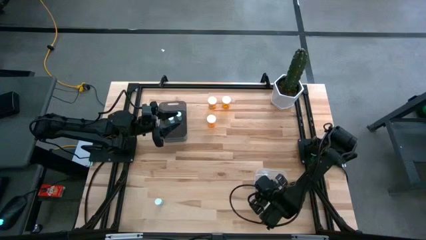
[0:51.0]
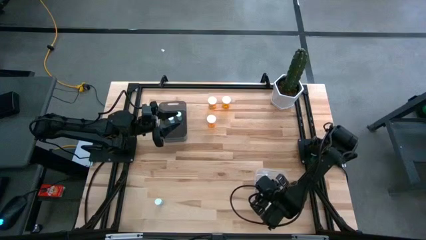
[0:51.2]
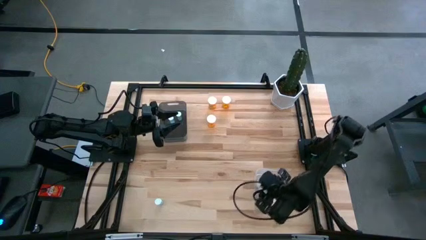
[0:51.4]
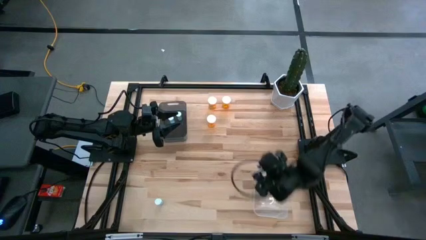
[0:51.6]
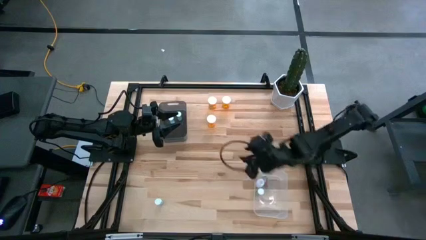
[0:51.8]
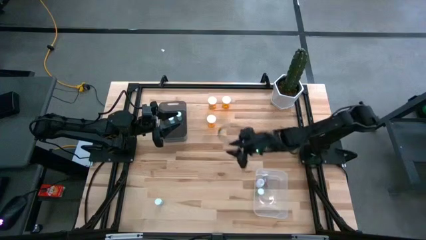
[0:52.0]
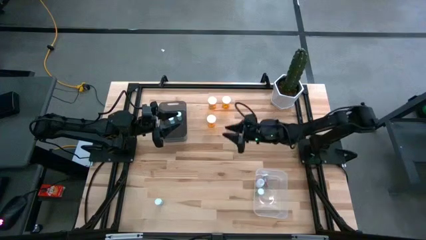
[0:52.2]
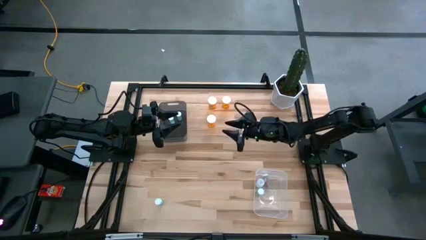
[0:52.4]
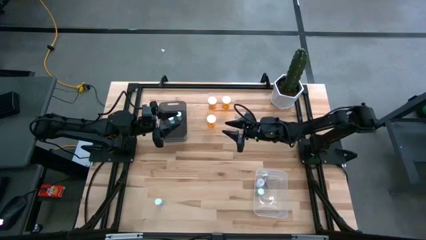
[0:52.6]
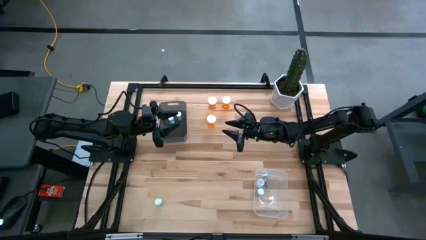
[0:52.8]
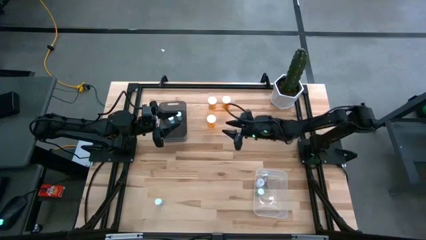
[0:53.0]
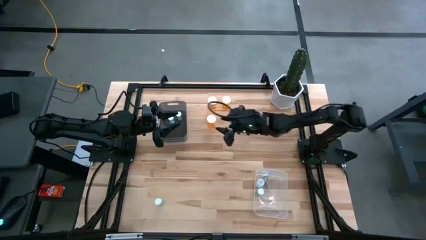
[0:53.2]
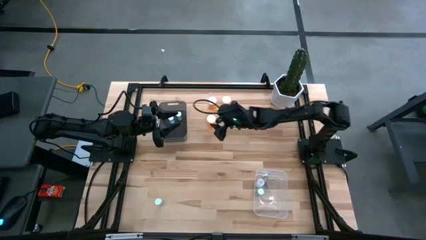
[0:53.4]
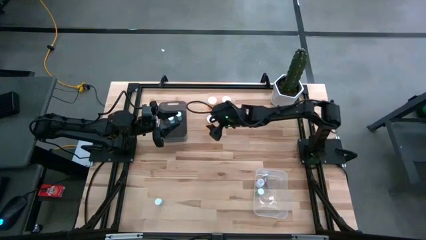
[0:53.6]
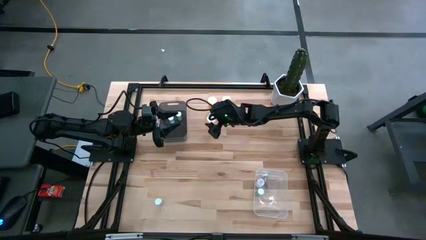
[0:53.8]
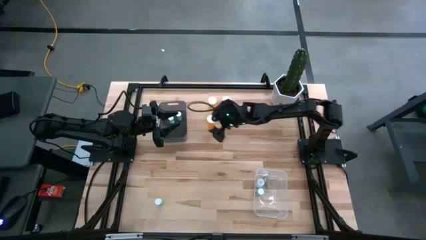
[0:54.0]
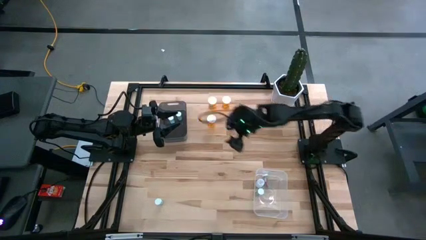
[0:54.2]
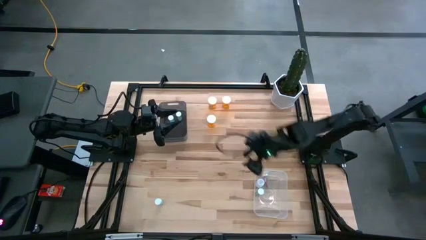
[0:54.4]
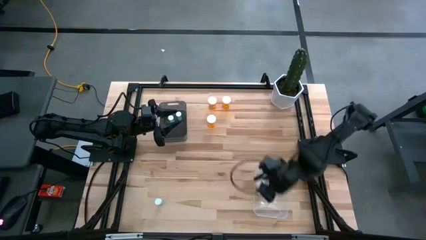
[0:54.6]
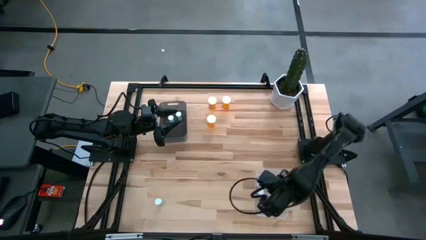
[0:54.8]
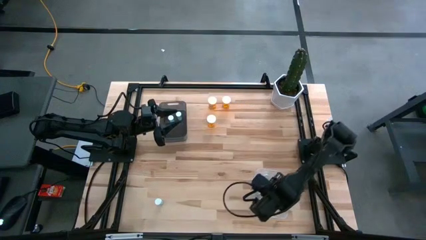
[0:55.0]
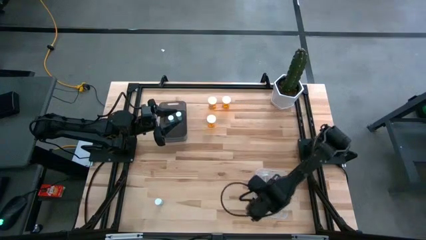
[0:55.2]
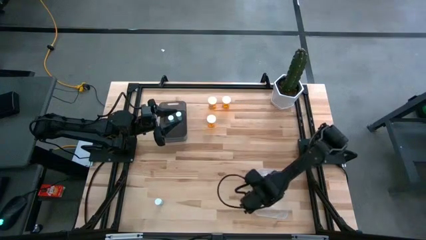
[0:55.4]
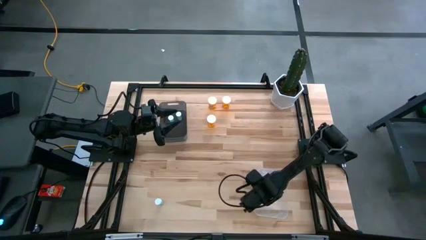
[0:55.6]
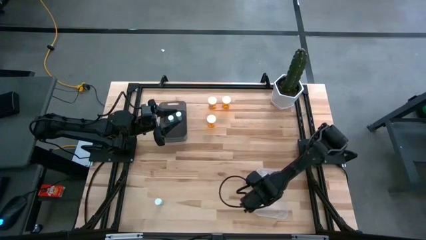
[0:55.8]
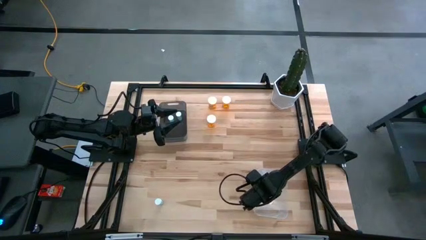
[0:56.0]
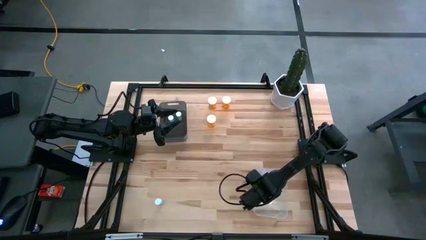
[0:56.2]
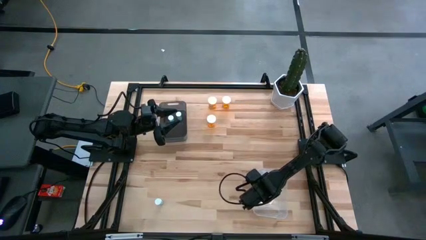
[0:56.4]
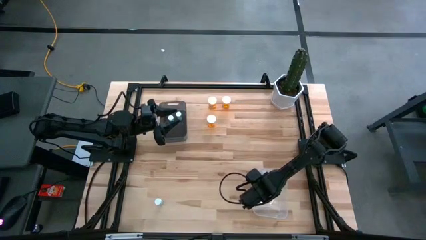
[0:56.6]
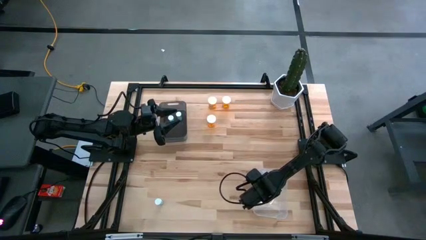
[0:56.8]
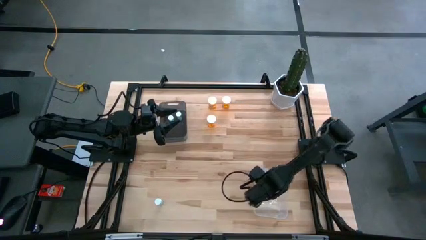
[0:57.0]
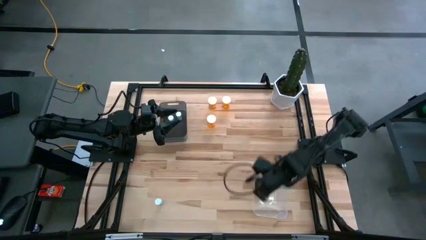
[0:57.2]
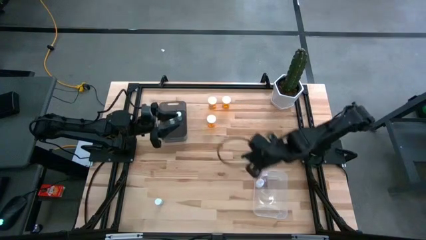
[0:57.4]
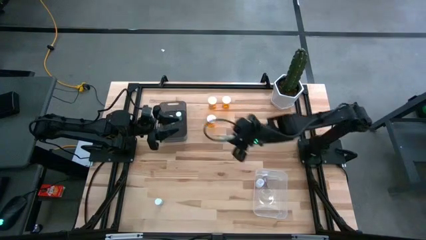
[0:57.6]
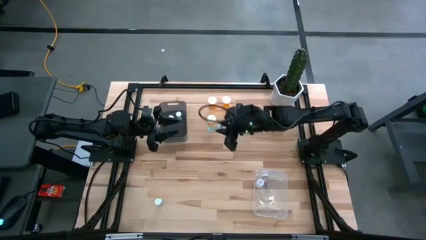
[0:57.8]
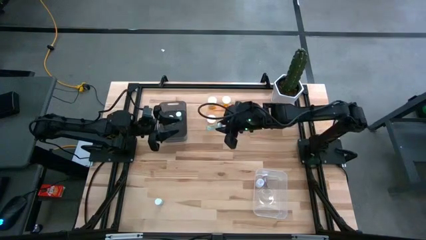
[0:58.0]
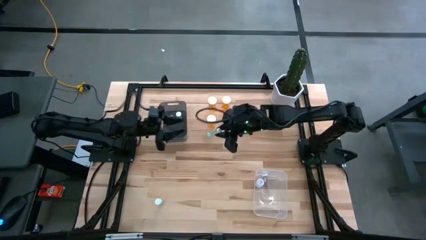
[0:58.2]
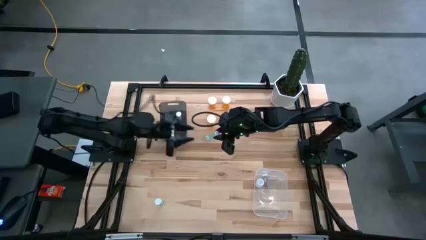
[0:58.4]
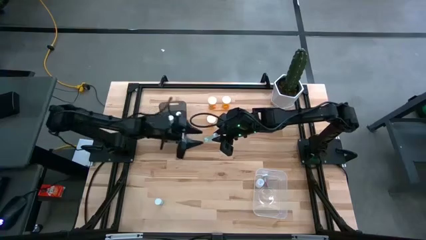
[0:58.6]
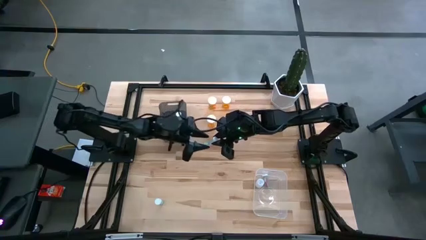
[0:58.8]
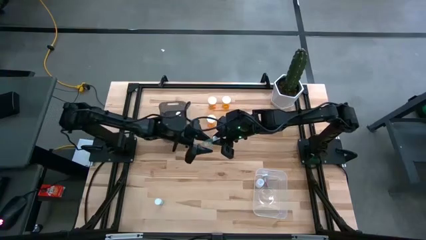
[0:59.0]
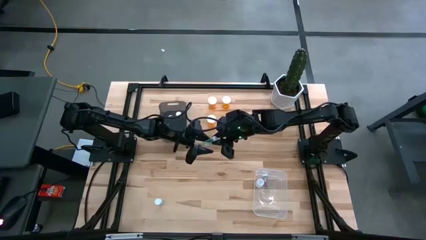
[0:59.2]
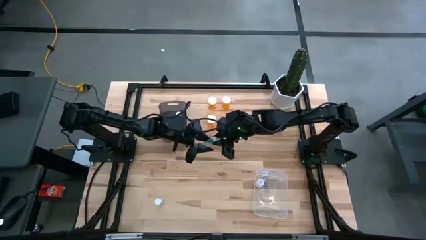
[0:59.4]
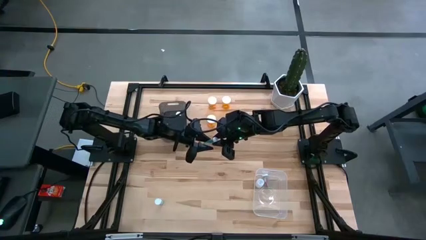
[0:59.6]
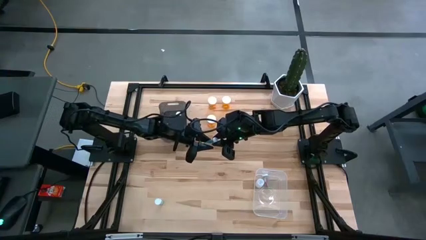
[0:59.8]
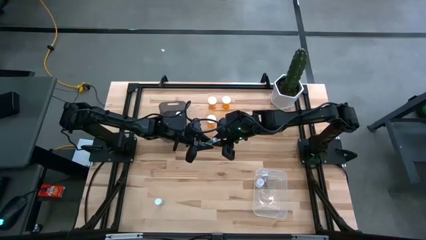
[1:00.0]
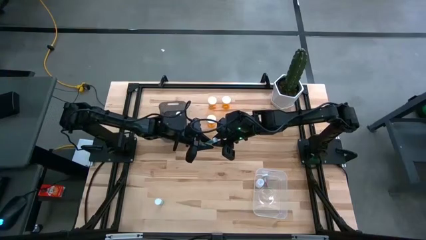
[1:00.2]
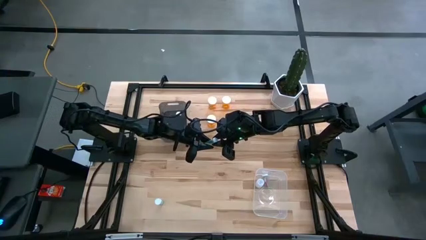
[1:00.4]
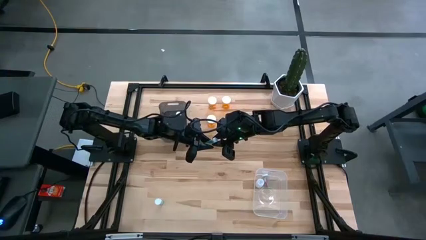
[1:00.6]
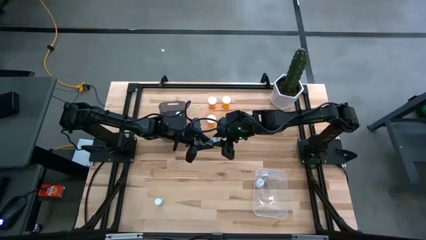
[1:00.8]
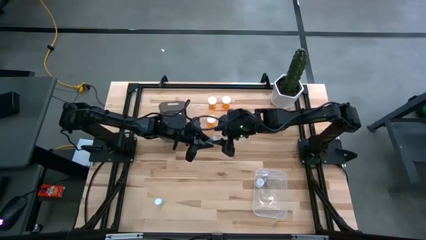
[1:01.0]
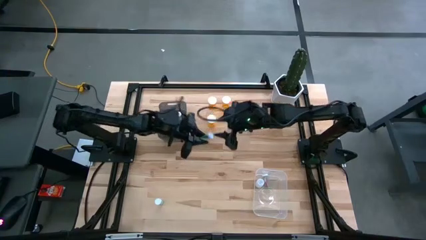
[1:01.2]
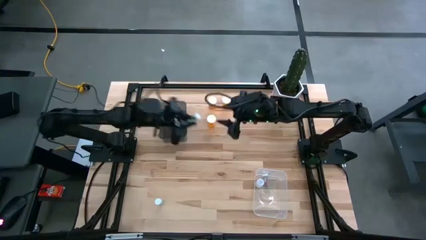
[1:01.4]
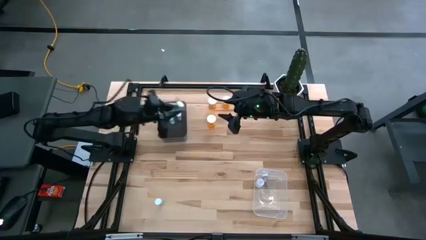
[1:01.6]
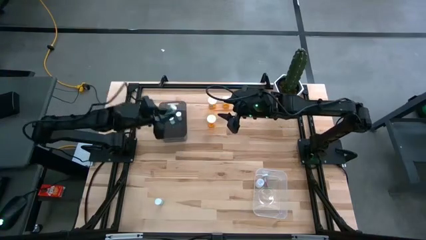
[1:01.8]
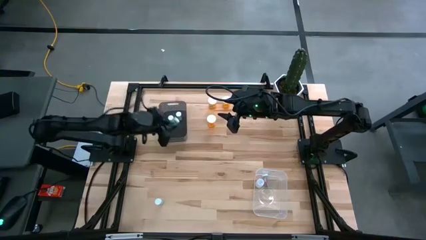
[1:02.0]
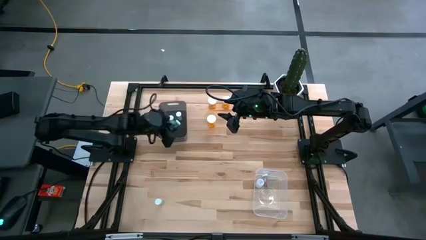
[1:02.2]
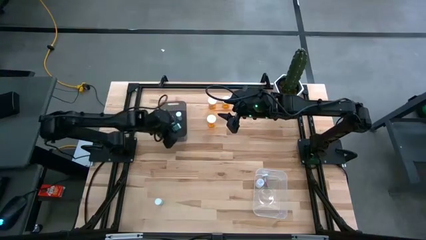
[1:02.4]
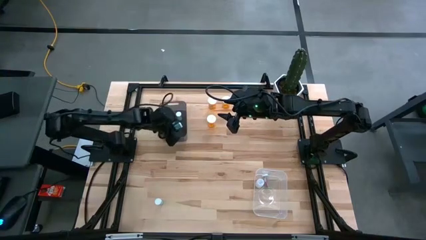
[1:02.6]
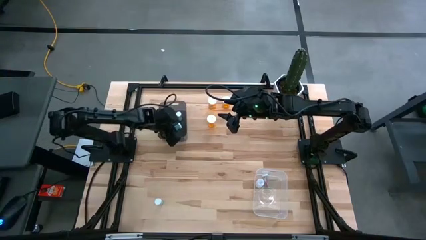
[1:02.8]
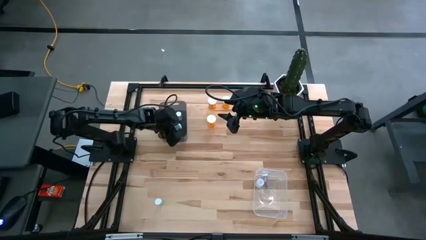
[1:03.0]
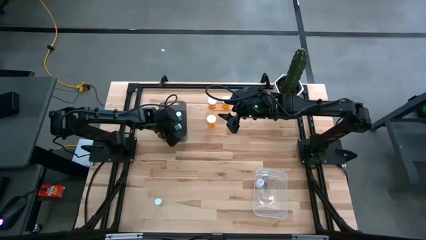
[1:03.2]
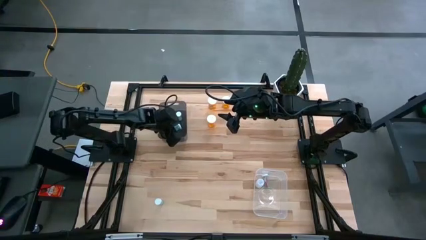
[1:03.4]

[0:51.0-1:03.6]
Task: Pick and place medicine bottles into bin by pill shape (circle, oval)
Remove the small blue medicine bottle into the black bin and place it into the transparent bin
